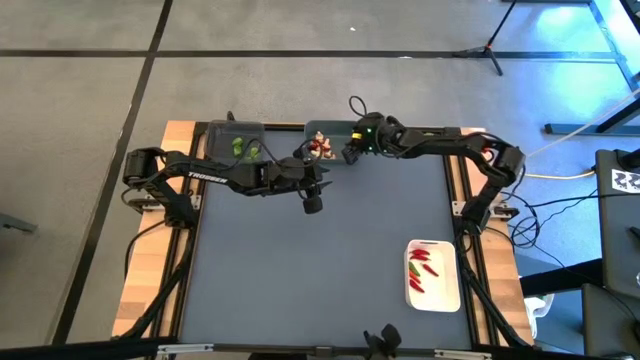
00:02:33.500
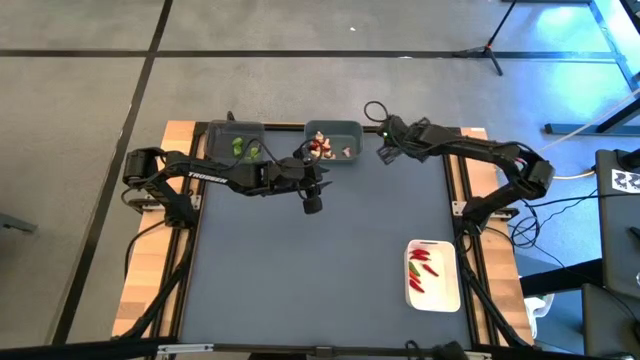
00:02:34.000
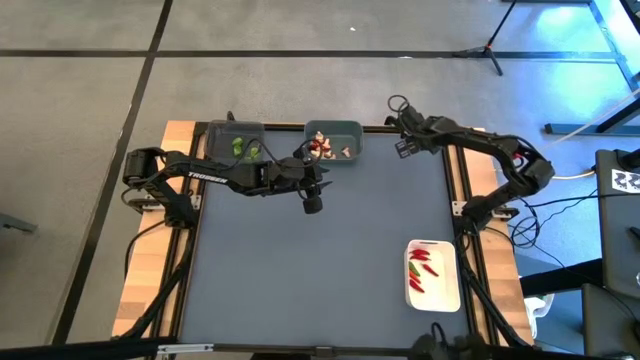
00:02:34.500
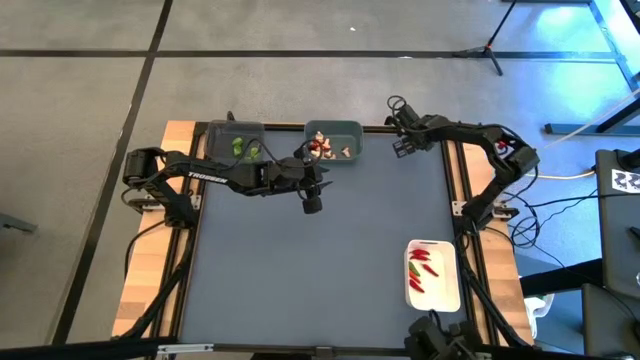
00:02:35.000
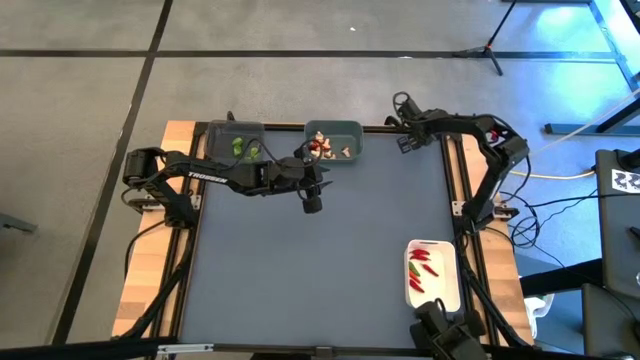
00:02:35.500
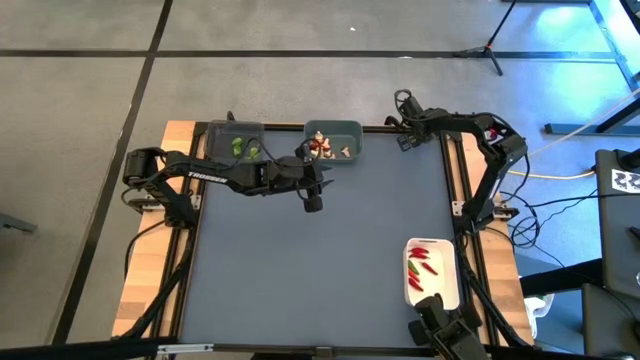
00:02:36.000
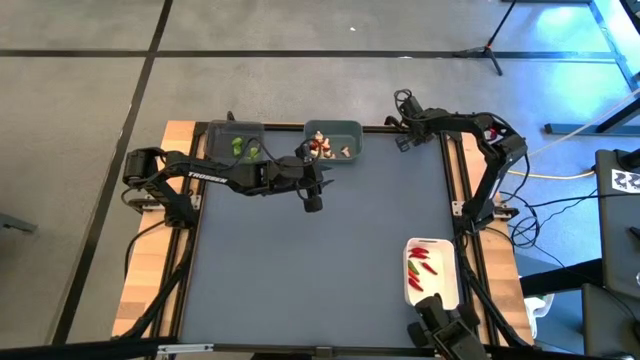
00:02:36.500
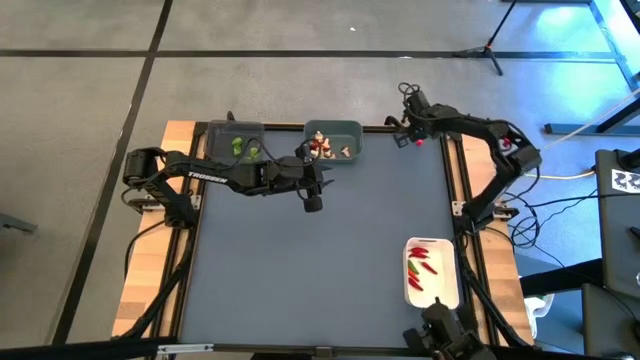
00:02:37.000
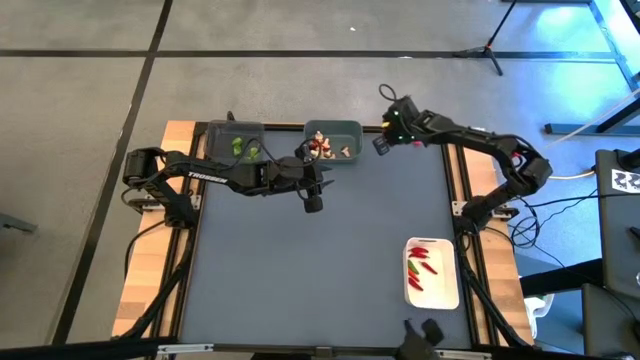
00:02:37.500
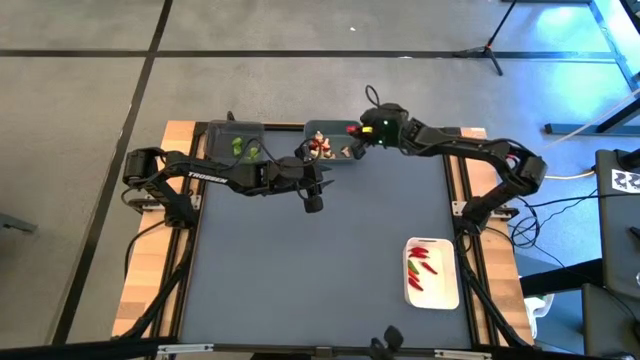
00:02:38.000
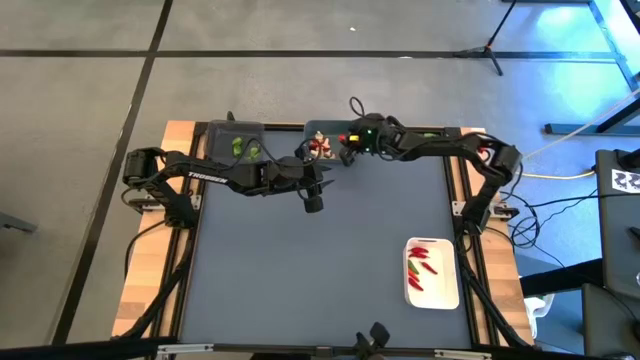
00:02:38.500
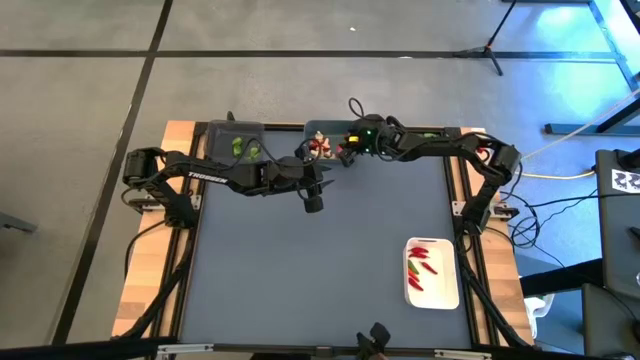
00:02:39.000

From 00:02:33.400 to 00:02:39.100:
Task: Sort produce into baskets
Put the red mushroom into the blue bin

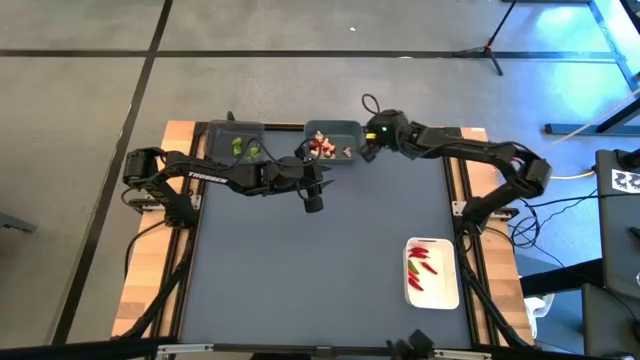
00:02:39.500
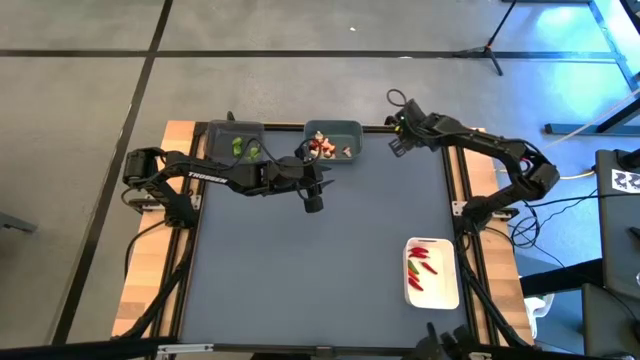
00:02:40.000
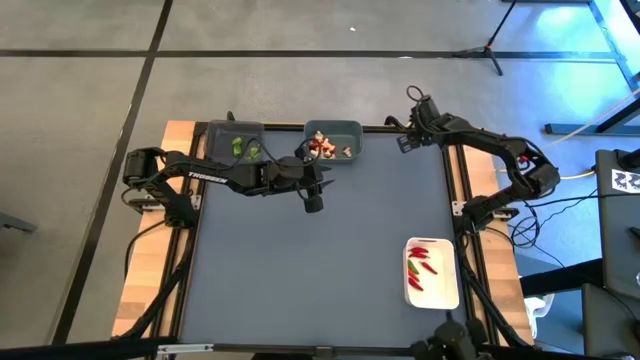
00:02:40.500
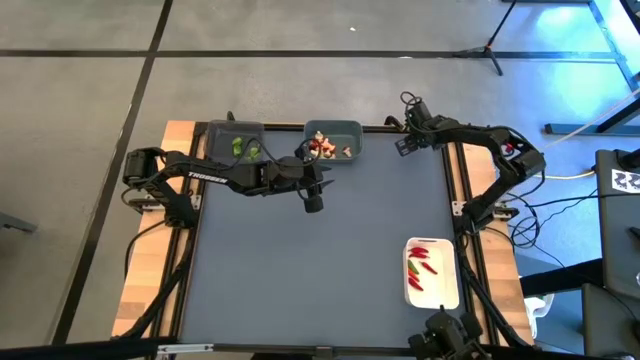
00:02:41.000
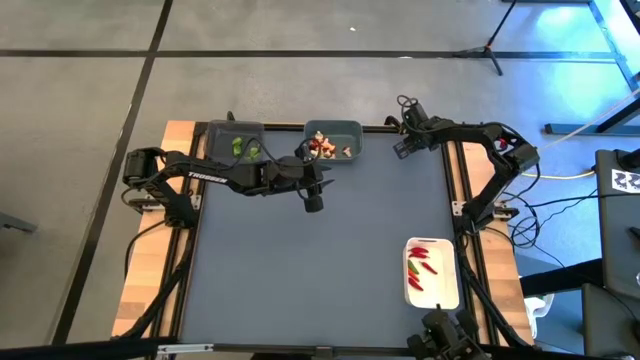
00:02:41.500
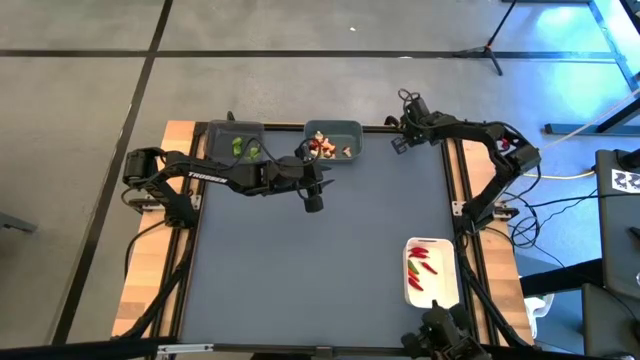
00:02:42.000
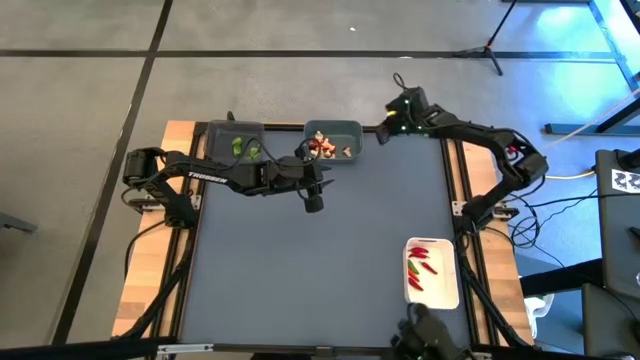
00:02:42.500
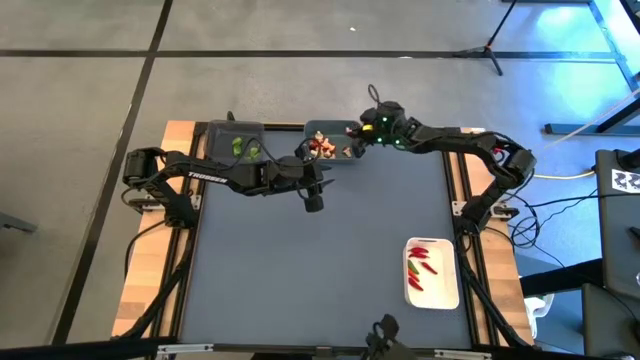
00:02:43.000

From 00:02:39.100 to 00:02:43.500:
Put the red mushroom into the blue bin

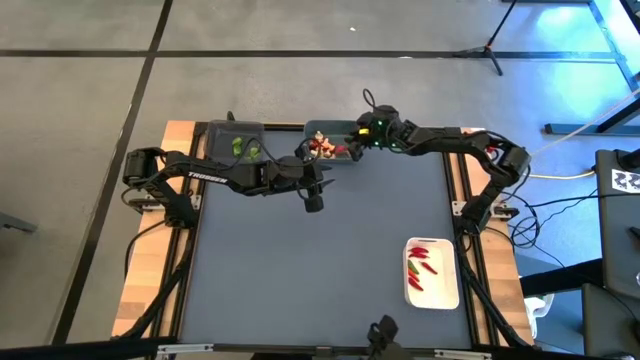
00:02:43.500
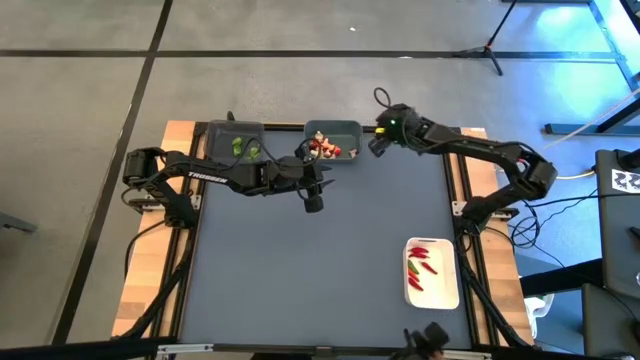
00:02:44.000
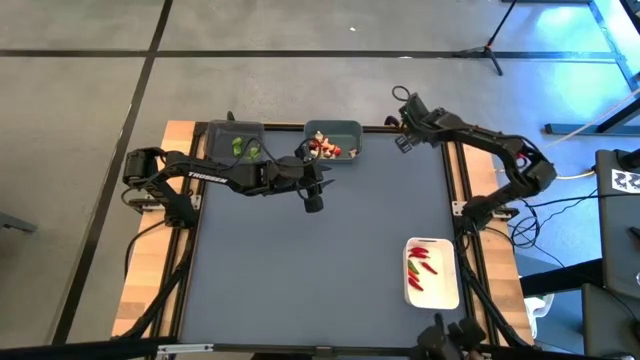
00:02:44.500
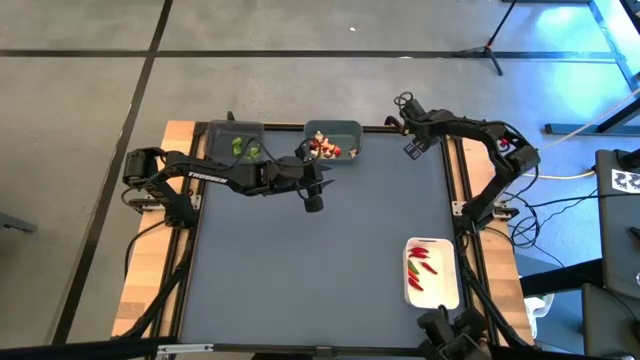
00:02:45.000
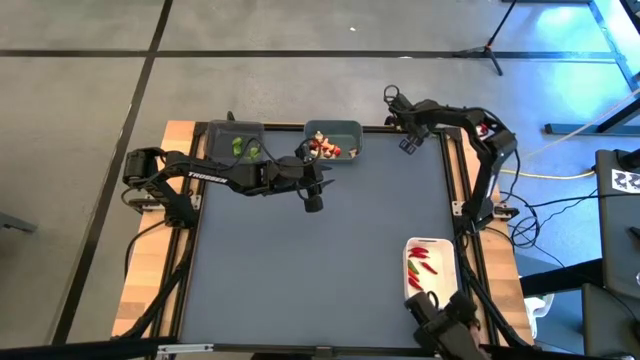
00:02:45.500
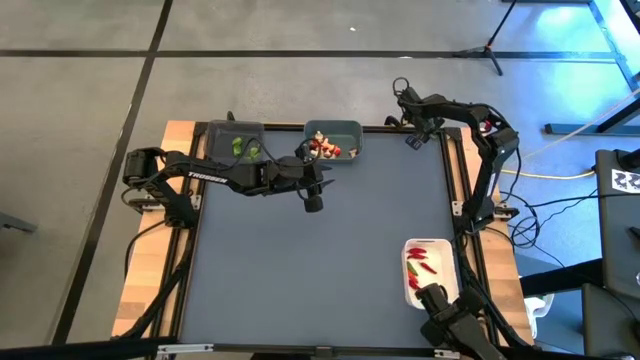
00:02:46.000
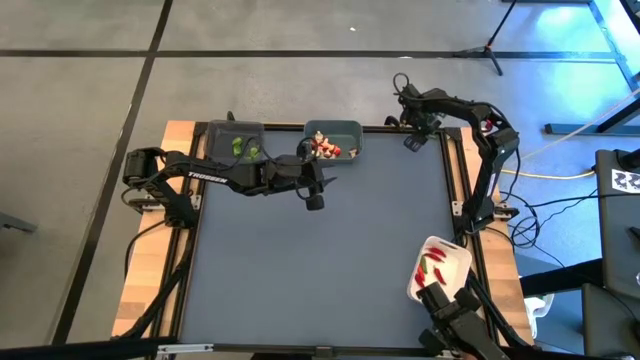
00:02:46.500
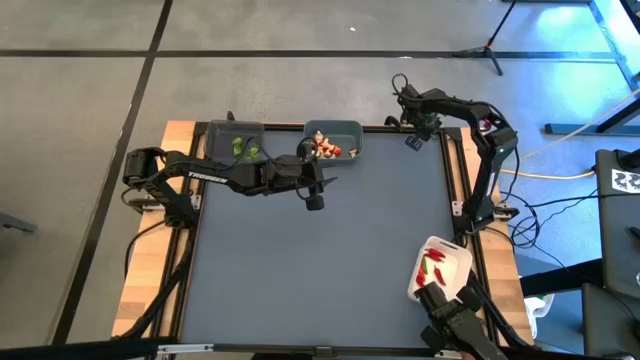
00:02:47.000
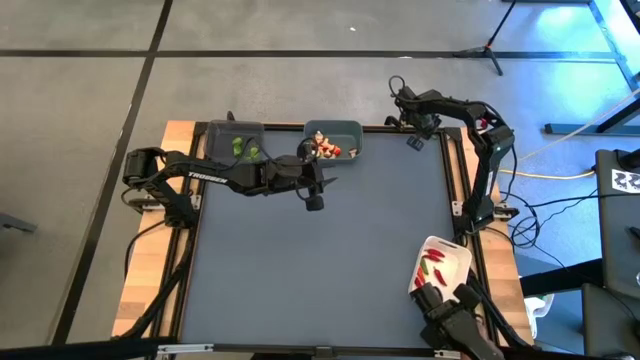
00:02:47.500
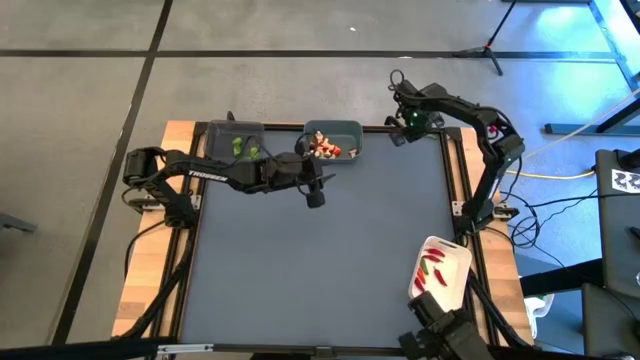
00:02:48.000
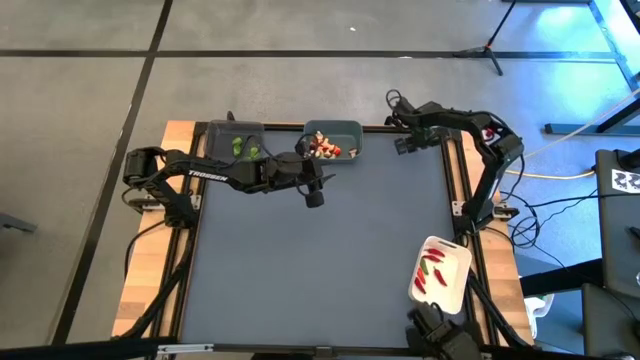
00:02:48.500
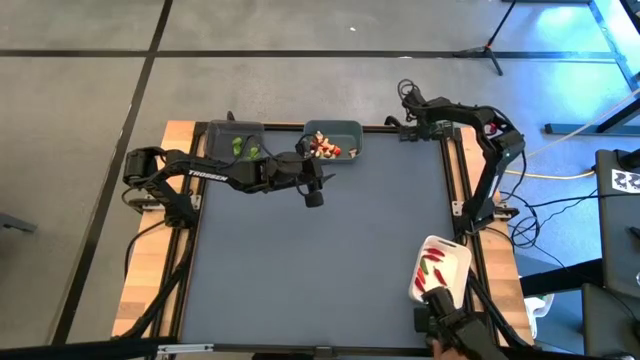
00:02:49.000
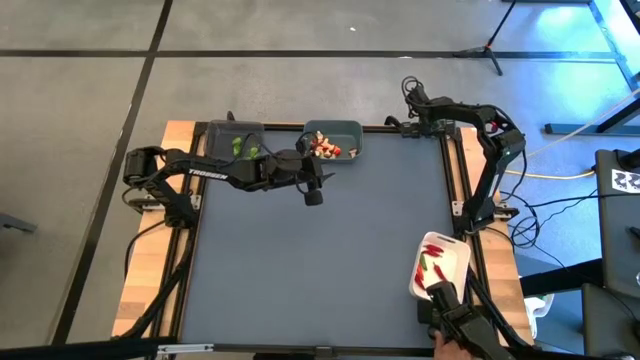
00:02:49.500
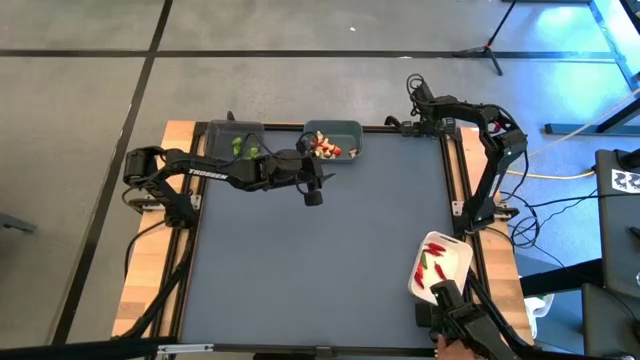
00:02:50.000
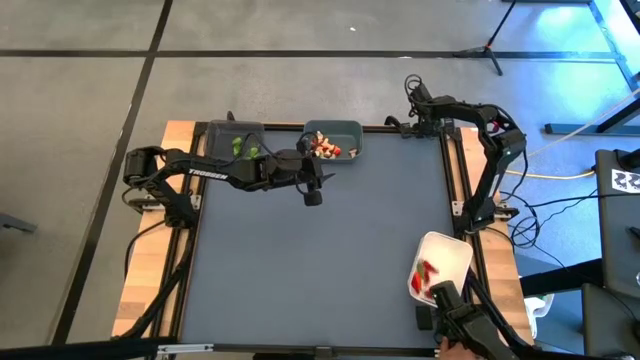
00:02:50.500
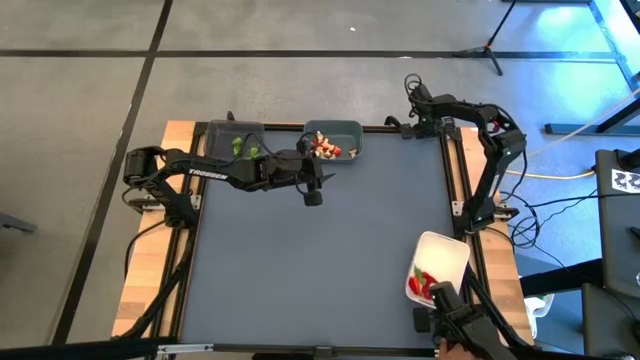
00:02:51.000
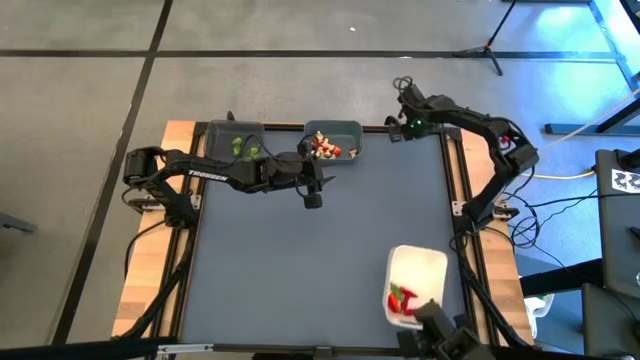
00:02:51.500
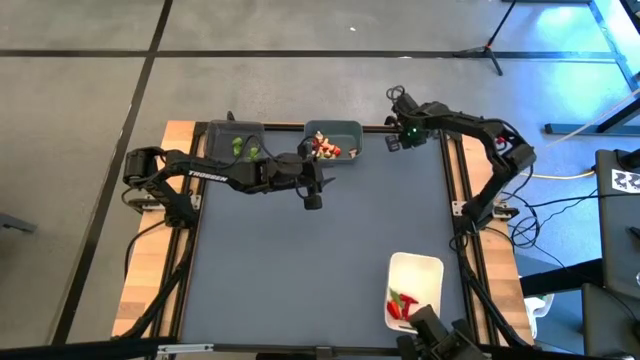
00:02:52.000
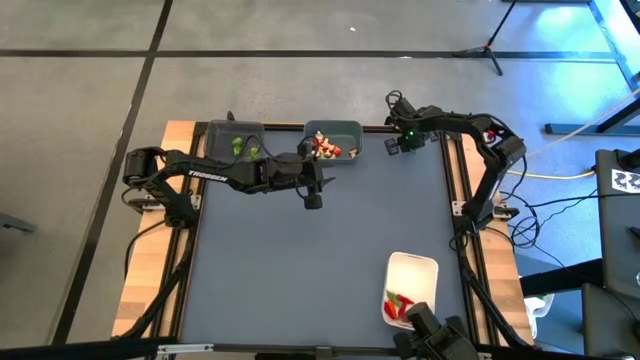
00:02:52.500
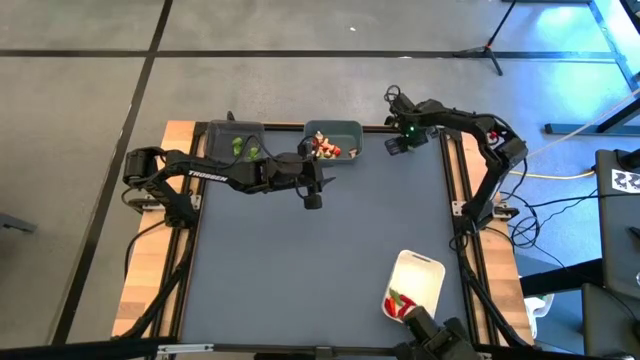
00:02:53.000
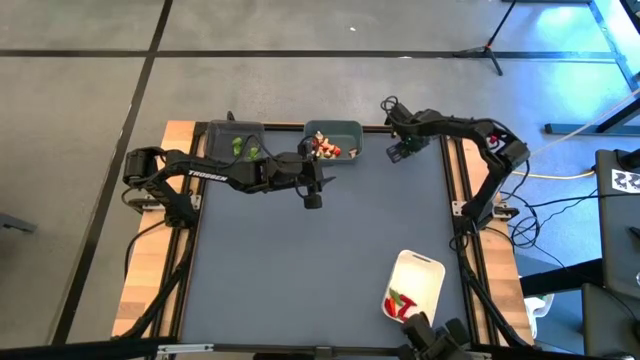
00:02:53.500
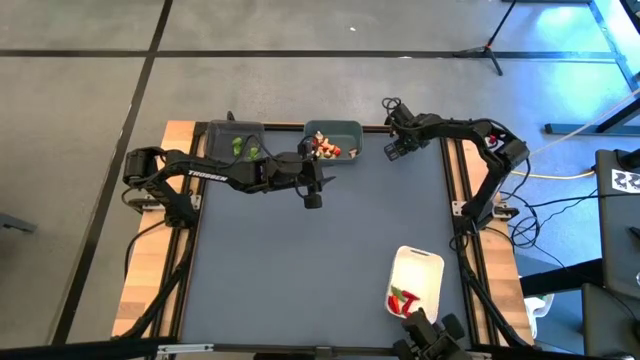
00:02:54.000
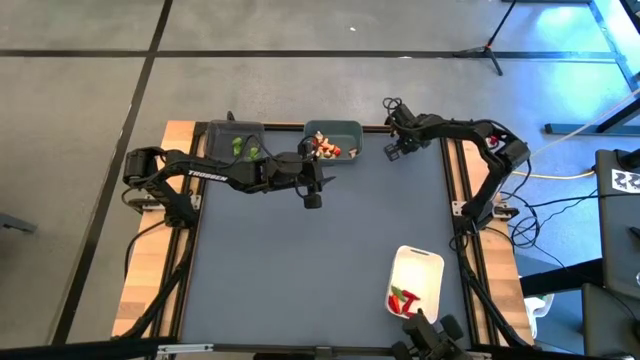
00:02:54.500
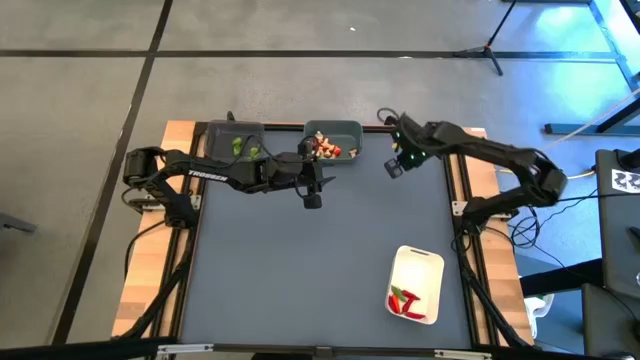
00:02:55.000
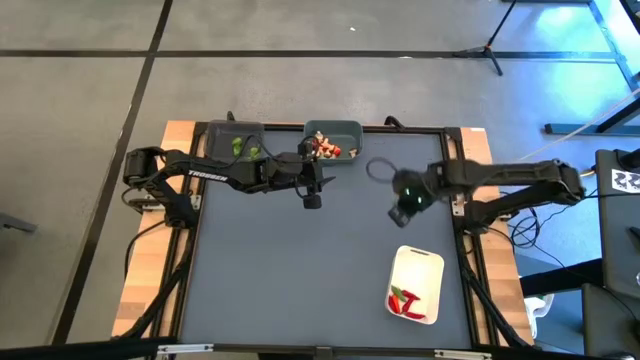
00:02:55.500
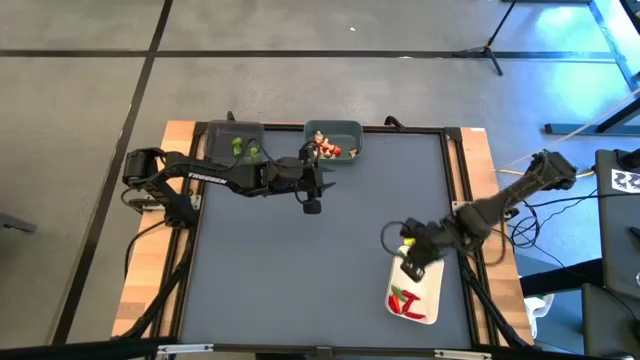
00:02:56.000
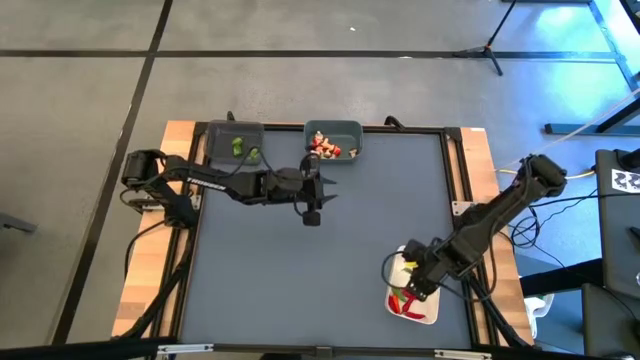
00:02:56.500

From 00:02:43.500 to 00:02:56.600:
Put the green chili pepper into the white bin
